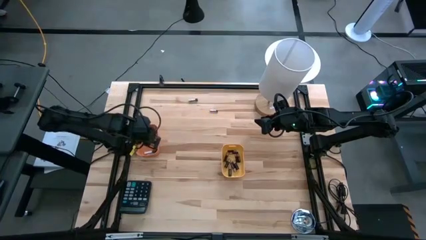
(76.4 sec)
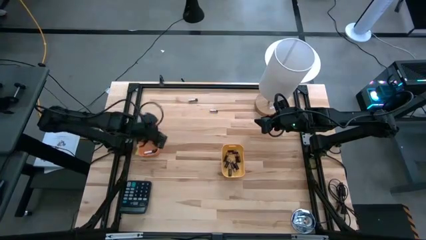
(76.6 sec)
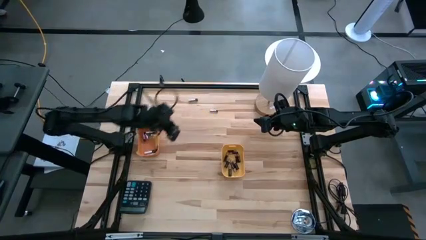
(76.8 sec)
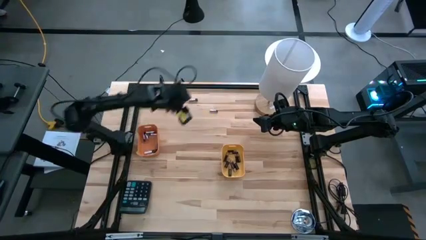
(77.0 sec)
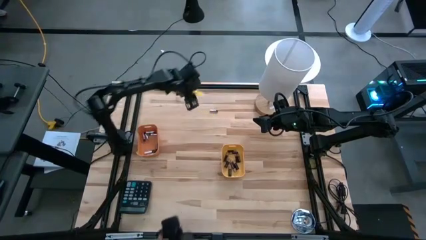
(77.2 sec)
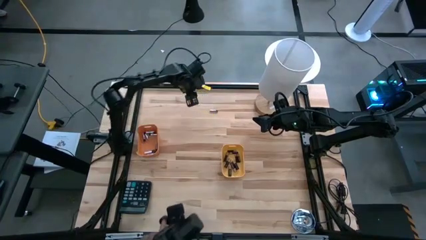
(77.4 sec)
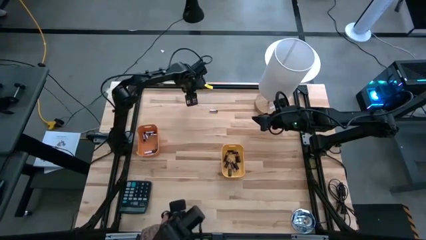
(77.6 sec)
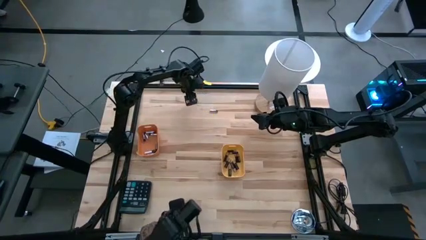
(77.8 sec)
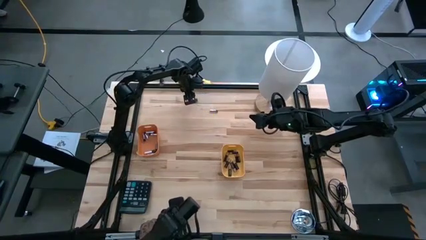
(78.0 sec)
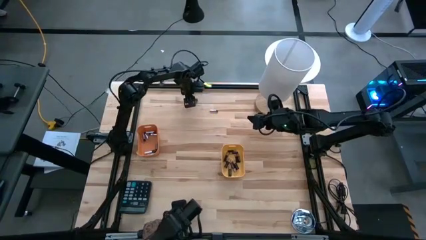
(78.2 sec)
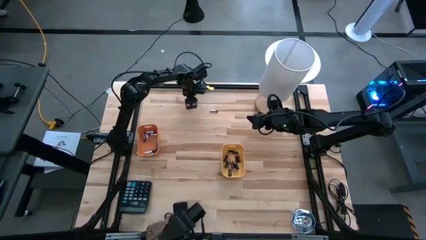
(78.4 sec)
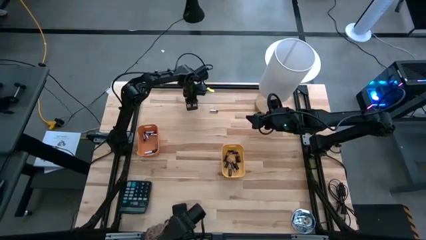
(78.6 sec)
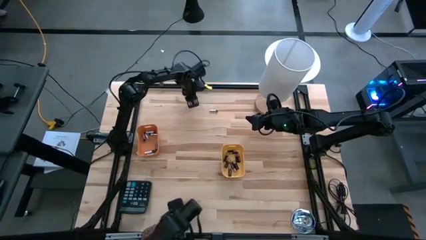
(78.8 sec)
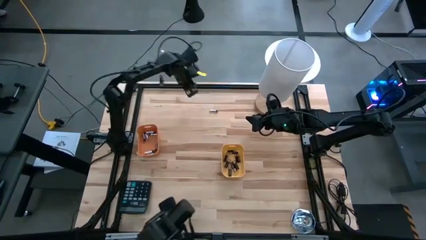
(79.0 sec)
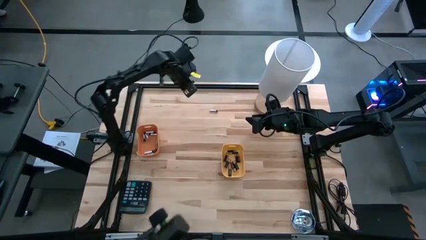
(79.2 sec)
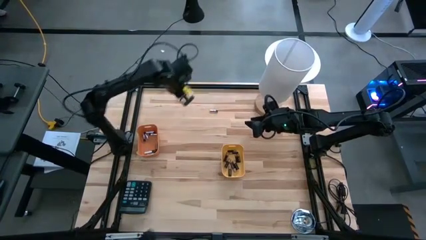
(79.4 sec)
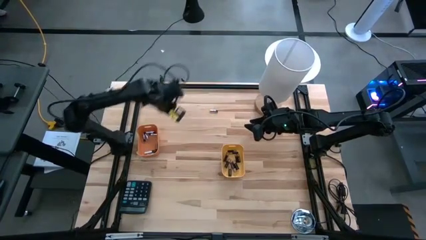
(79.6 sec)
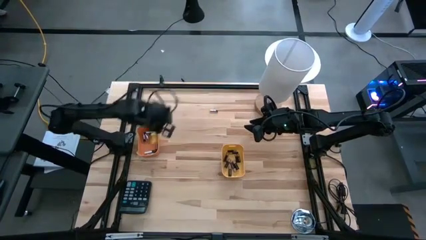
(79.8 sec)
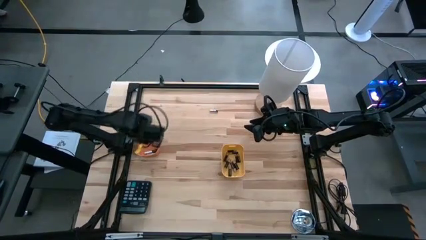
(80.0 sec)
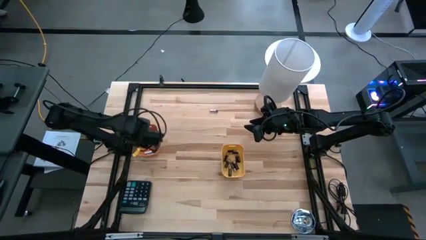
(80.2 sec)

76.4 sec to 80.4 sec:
Task: Sort batteries
Put the silver battery into the orange bin

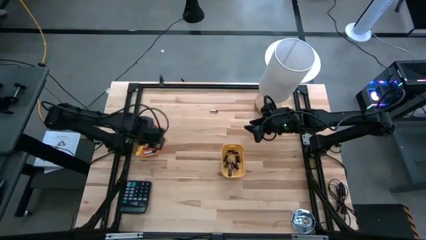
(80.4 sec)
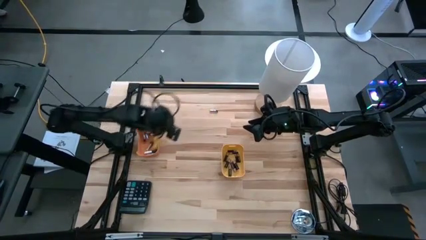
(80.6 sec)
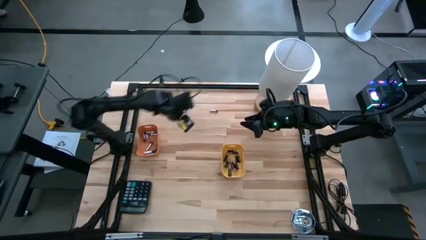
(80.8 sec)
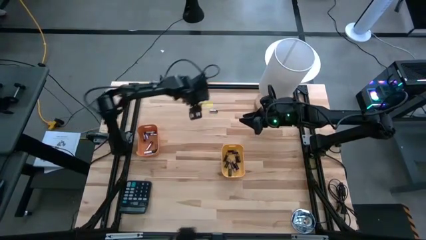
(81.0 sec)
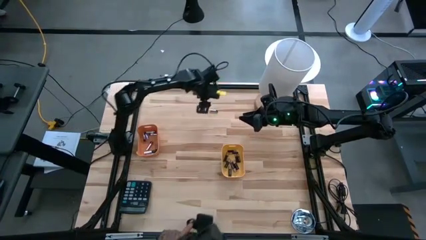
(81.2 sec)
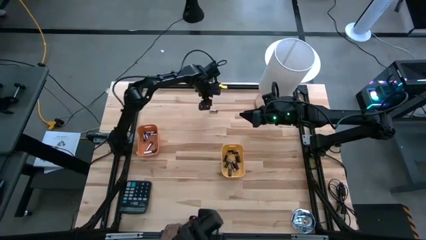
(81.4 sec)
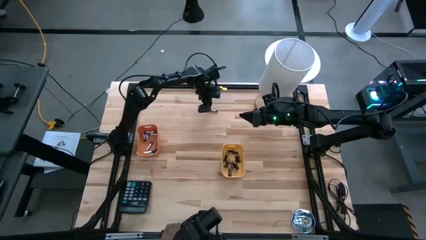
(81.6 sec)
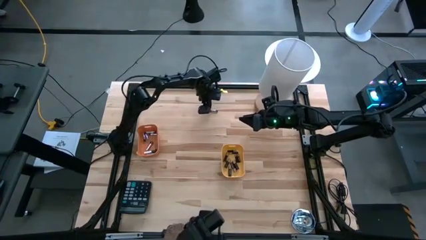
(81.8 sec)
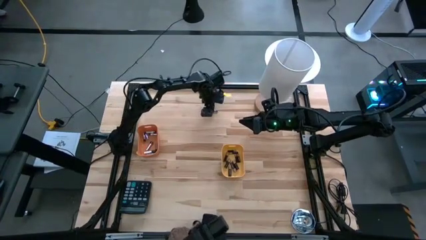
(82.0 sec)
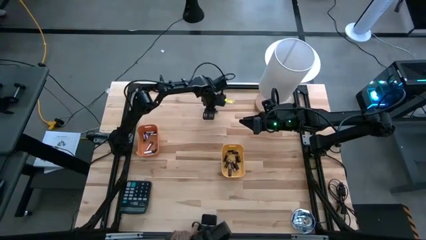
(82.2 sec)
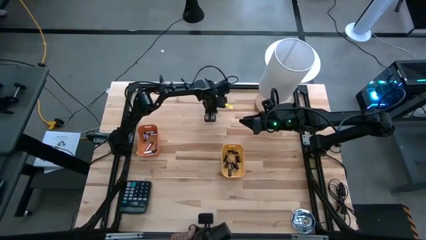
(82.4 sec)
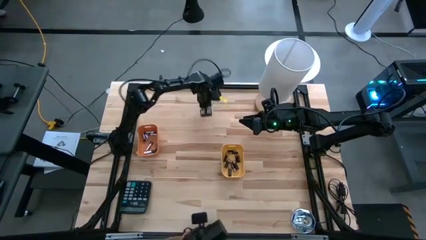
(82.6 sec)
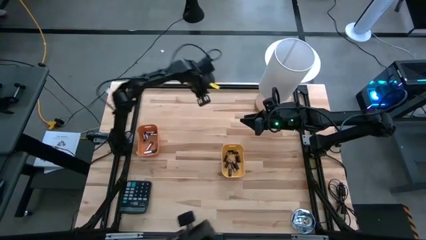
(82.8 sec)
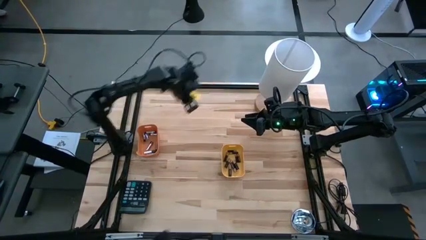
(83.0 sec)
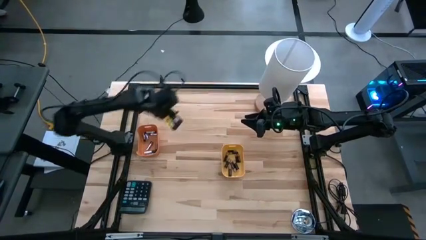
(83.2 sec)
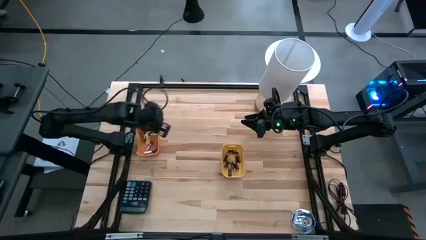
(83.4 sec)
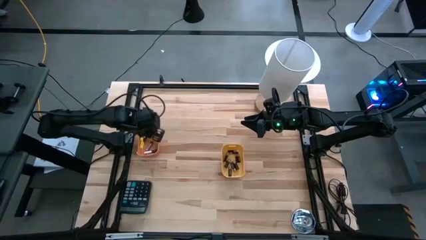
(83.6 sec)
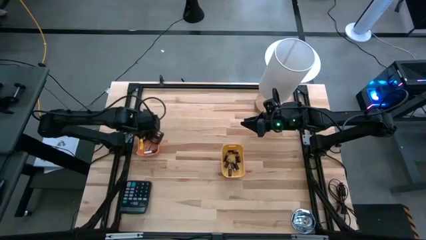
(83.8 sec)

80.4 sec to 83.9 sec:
Put the silver battery into the orange bin

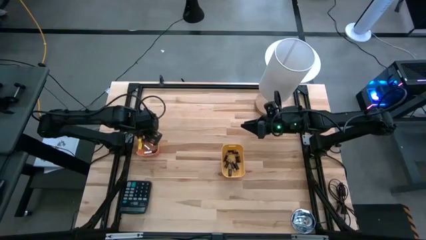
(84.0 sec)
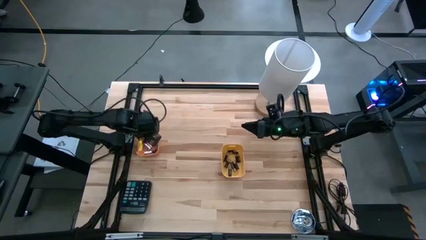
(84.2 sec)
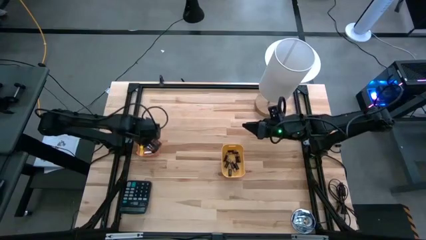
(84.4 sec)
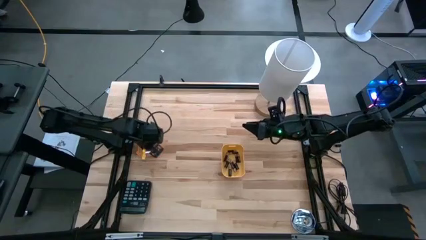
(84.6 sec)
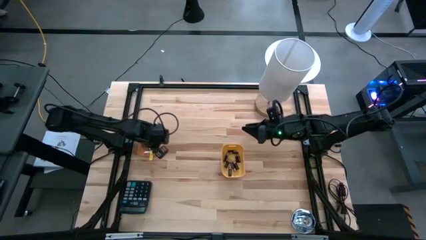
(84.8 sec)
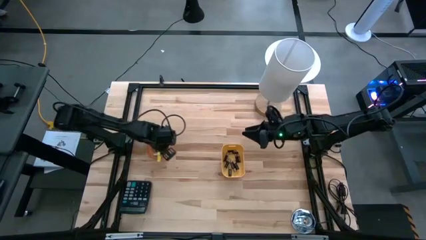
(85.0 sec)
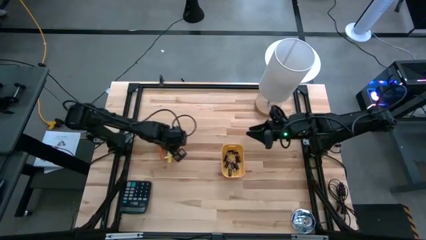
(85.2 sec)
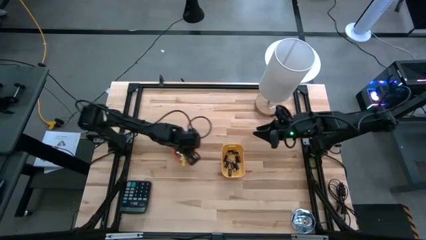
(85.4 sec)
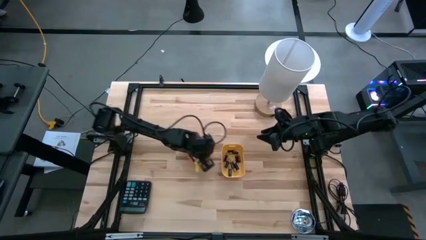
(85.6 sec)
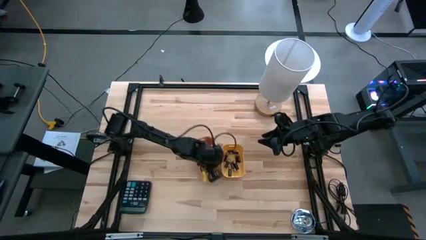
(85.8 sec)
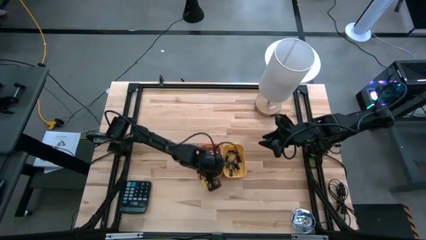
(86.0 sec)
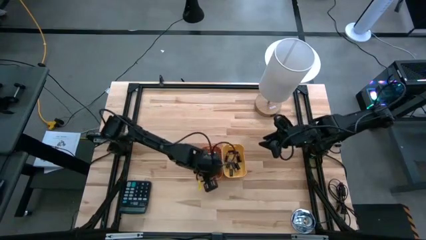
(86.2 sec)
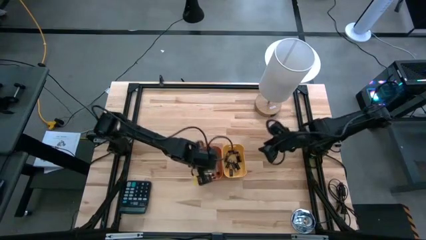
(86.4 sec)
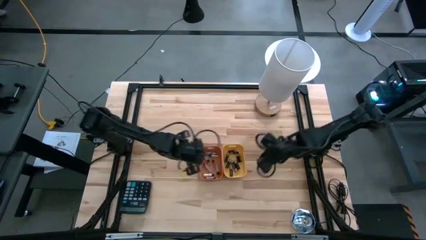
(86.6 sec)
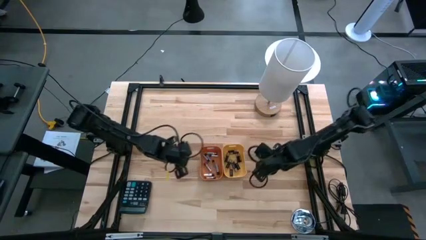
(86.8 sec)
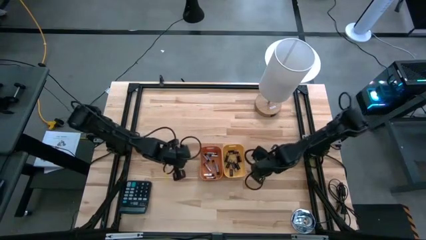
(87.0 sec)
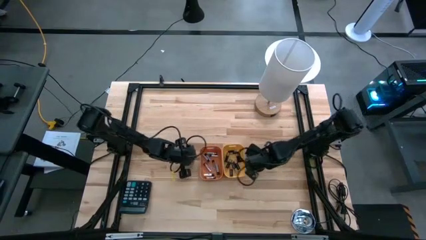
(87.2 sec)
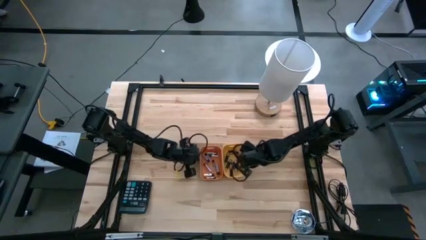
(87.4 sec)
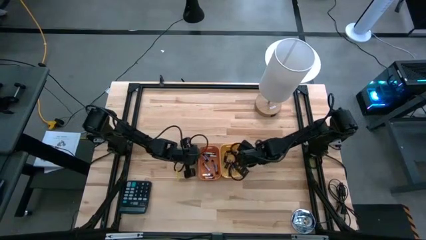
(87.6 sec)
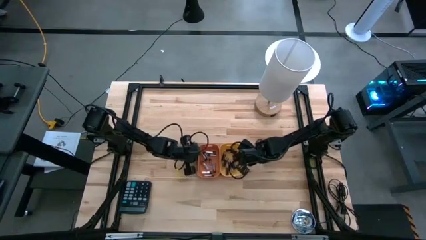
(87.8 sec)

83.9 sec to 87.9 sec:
Move the orange bin to the center of the table

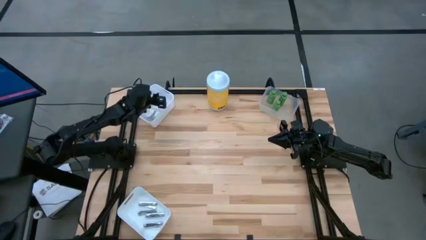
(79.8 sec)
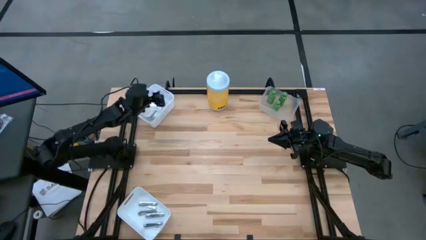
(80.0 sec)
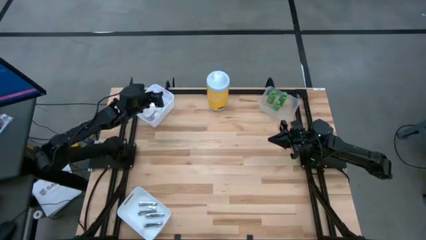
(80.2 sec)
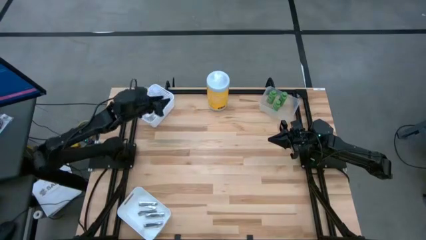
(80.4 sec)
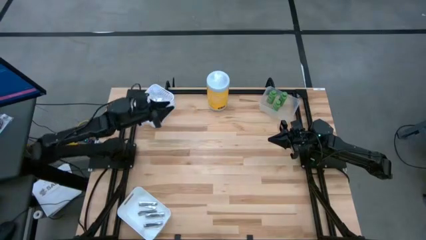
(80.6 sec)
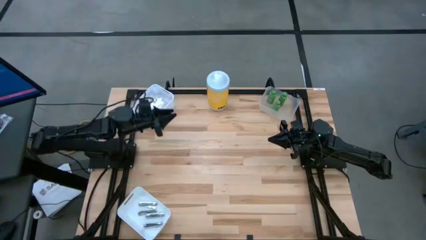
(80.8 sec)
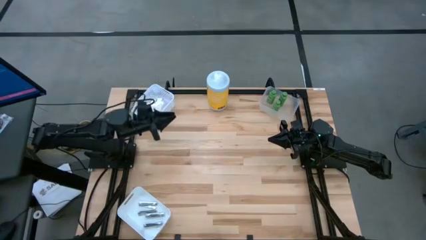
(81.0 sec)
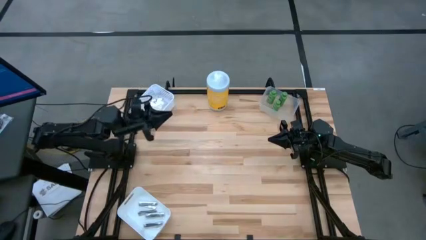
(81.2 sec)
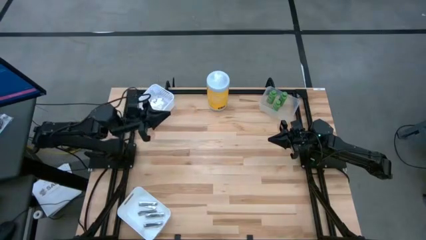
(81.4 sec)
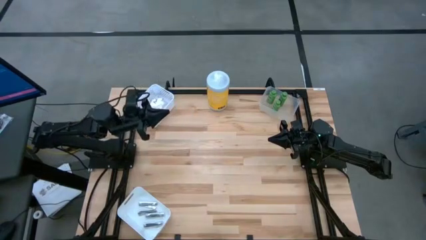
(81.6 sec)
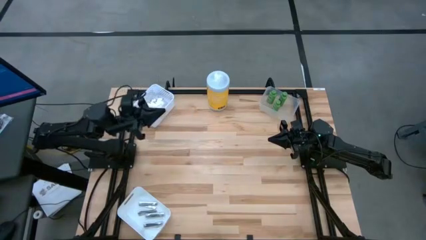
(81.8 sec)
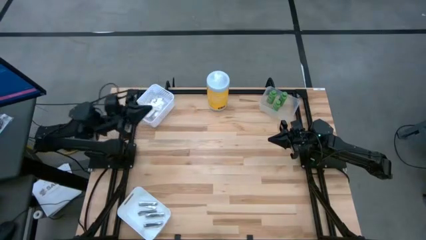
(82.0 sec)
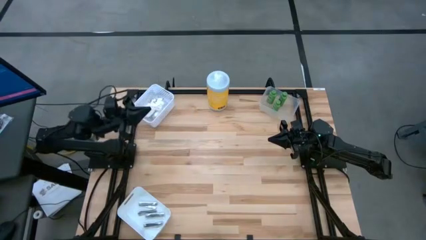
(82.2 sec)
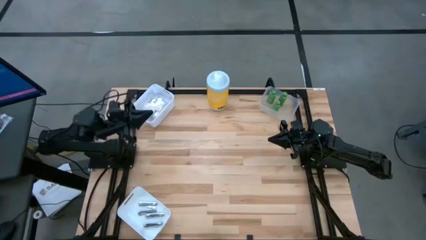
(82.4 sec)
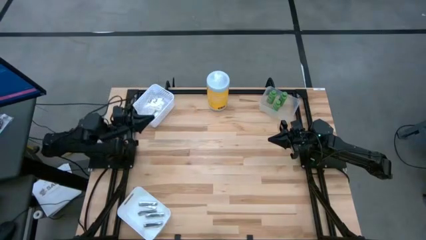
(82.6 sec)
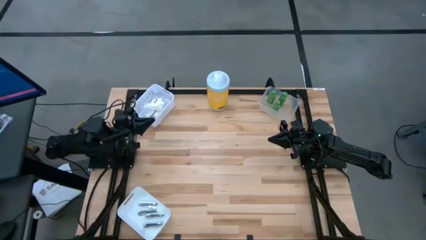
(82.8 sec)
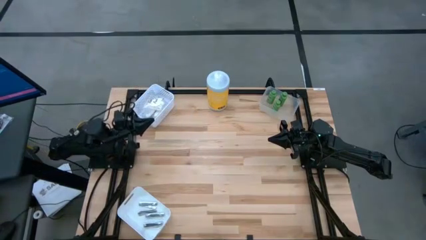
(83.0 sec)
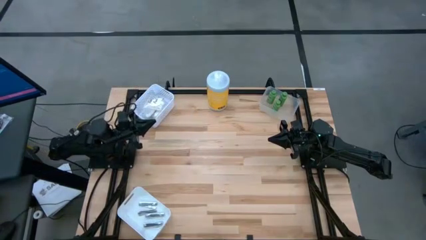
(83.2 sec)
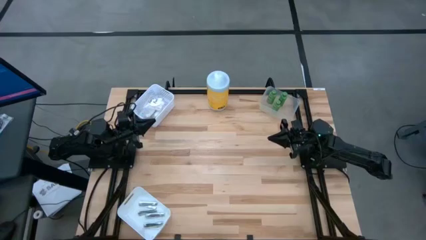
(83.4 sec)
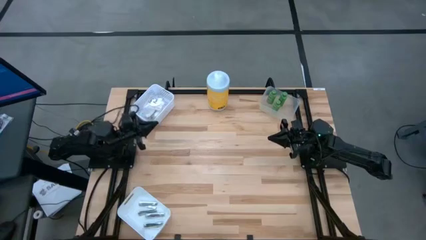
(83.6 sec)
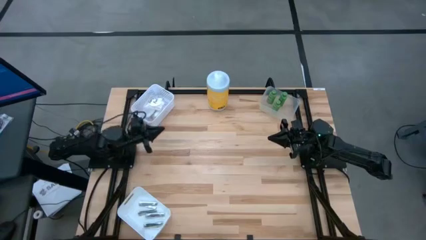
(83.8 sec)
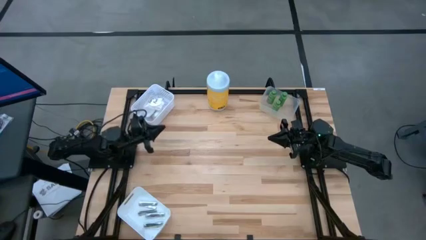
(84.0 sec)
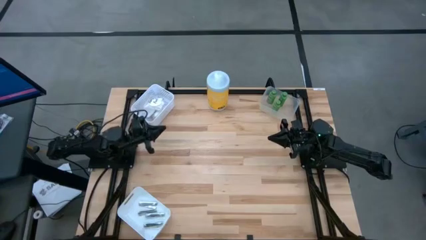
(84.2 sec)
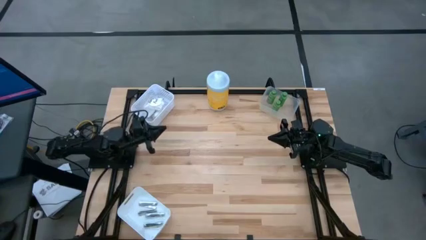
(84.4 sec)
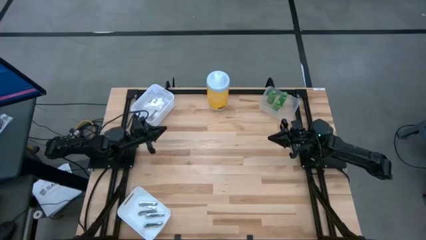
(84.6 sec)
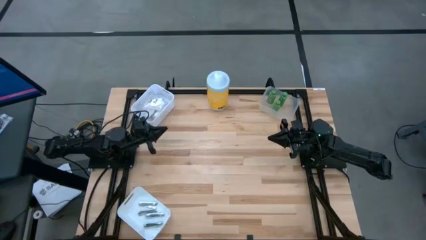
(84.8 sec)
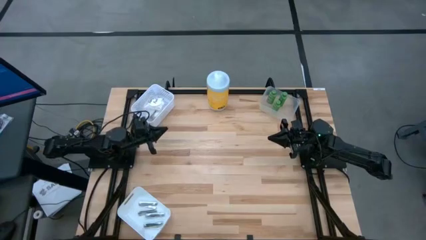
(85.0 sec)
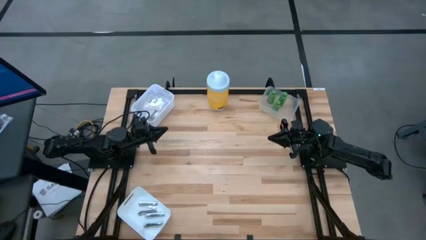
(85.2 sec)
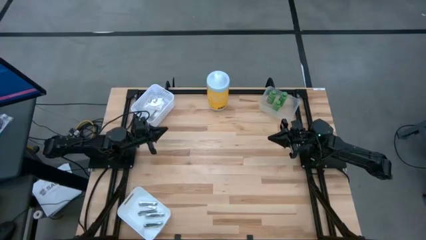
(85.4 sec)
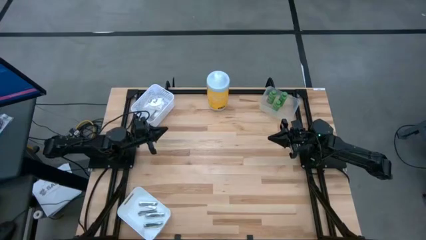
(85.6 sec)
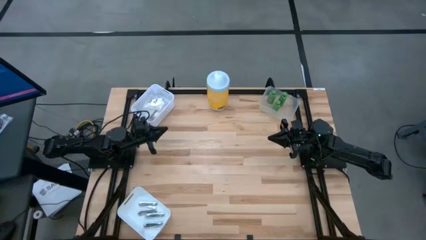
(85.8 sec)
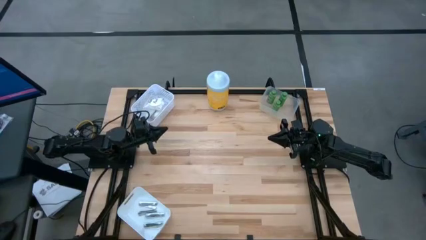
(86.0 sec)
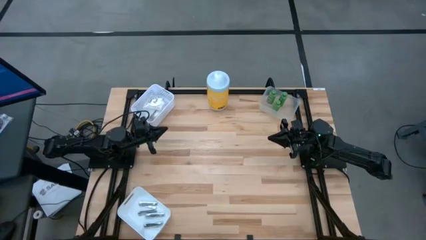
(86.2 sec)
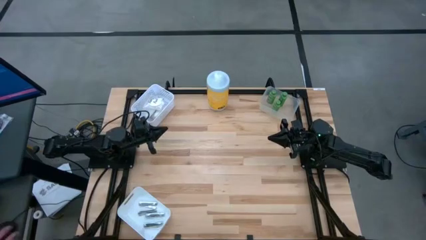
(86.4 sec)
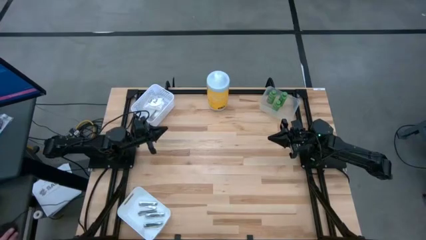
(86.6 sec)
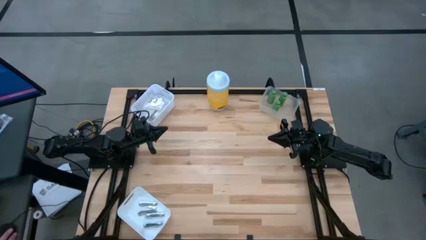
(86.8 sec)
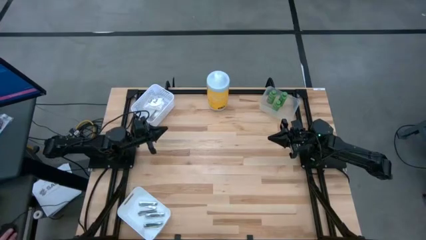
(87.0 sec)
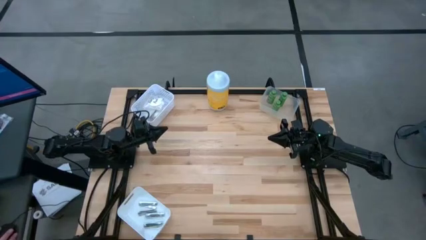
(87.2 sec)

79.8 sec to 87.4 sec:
Task: Pick & Place Travel size toiletries
Return to Home Position
